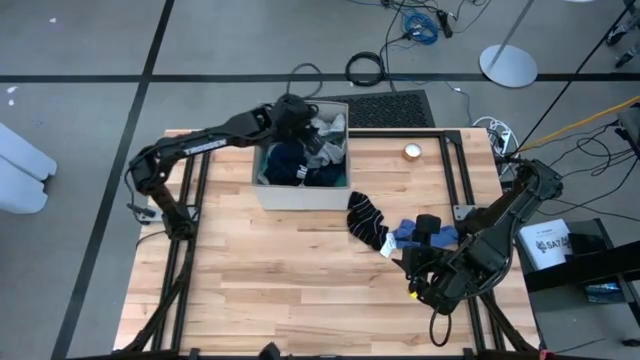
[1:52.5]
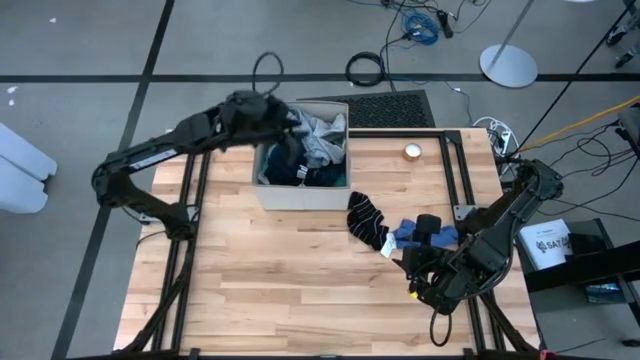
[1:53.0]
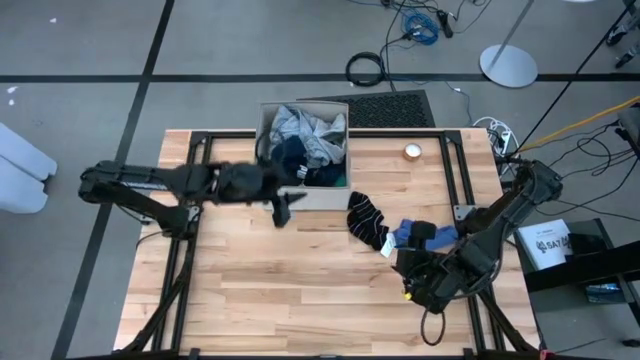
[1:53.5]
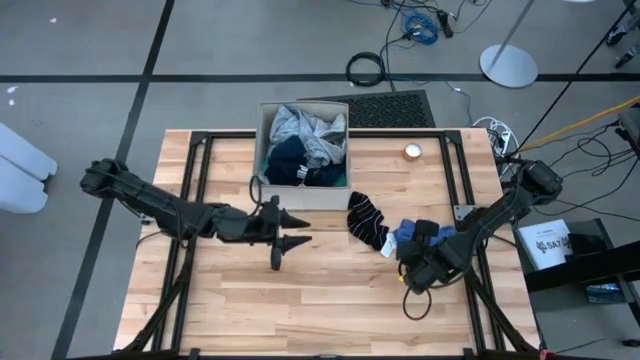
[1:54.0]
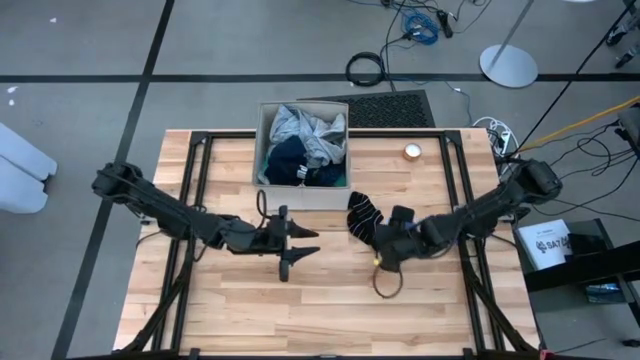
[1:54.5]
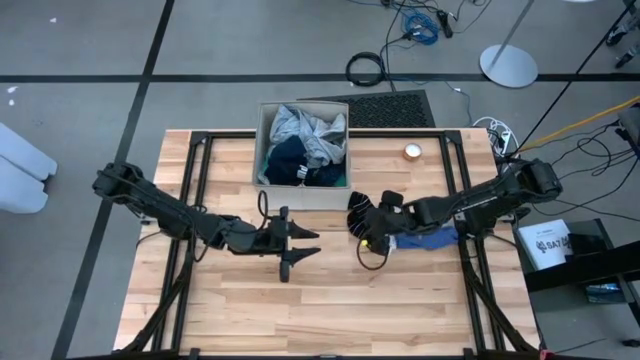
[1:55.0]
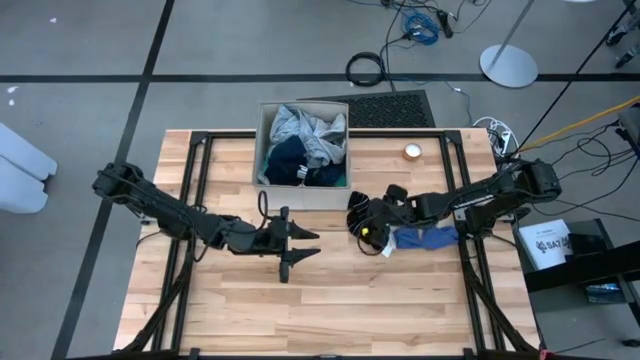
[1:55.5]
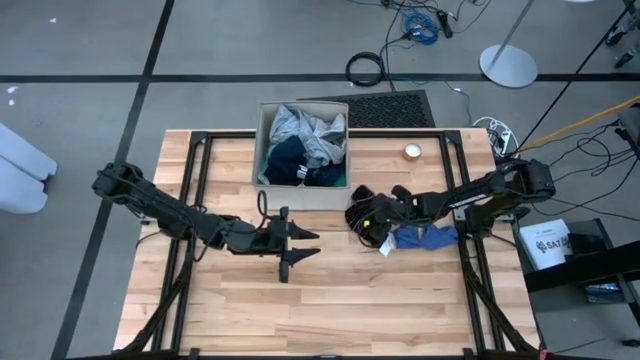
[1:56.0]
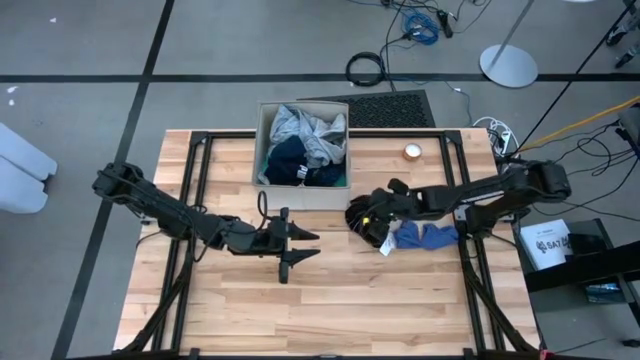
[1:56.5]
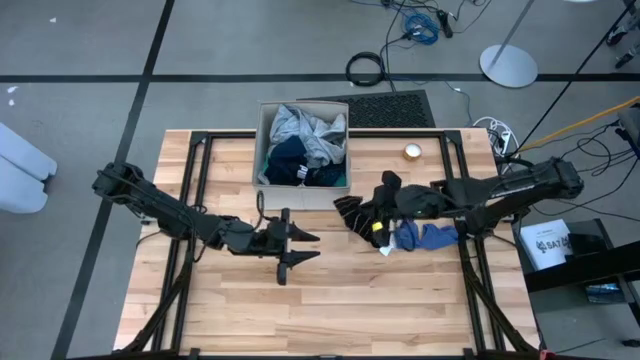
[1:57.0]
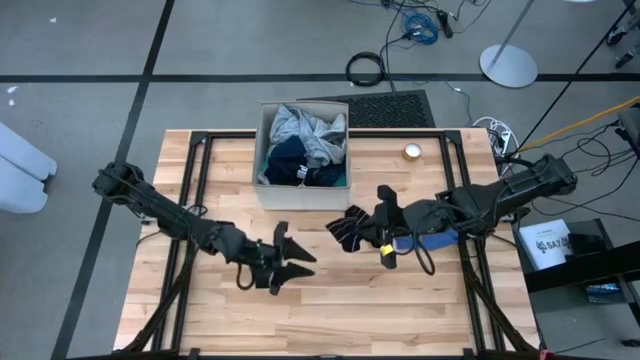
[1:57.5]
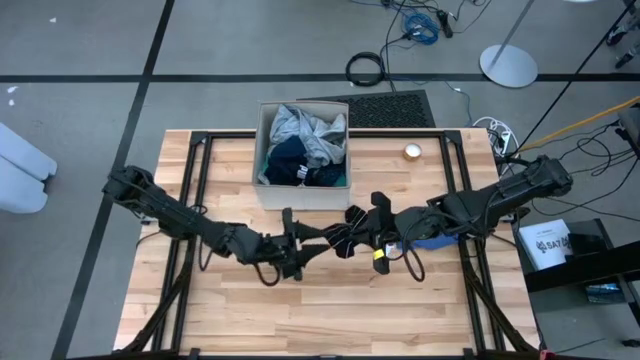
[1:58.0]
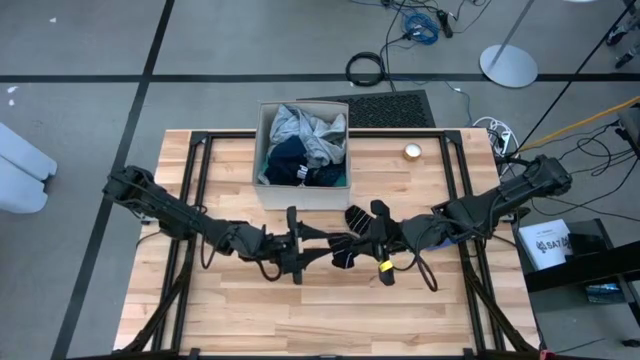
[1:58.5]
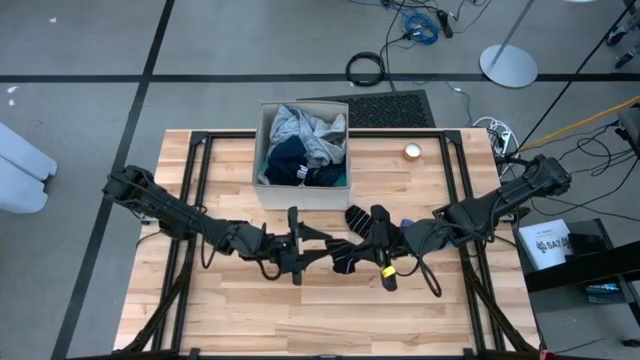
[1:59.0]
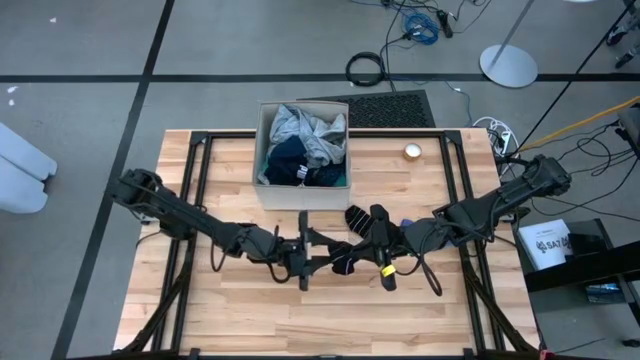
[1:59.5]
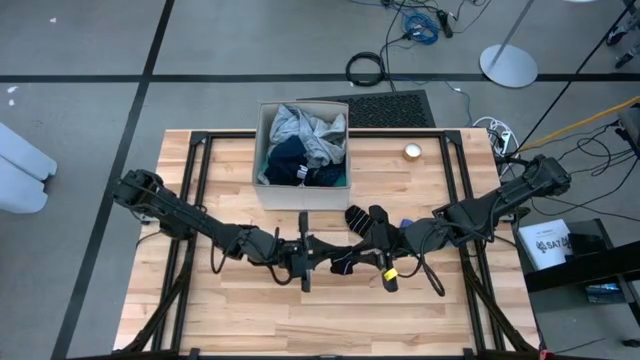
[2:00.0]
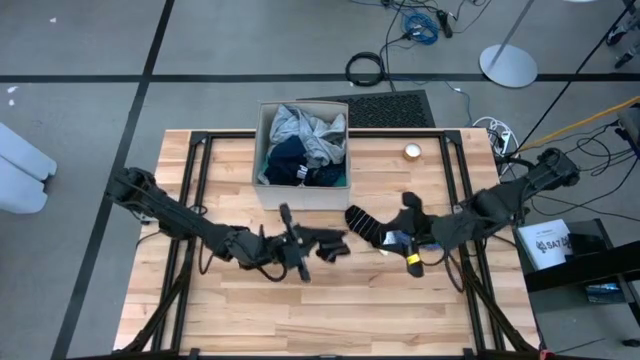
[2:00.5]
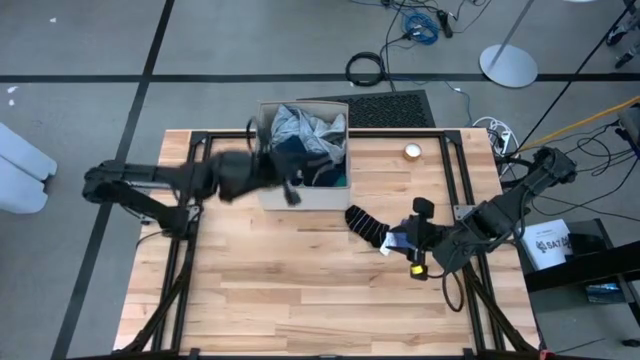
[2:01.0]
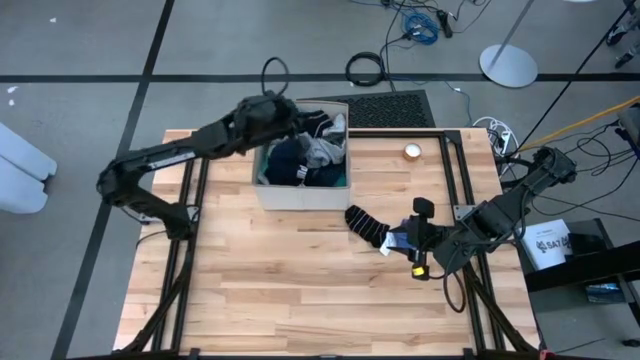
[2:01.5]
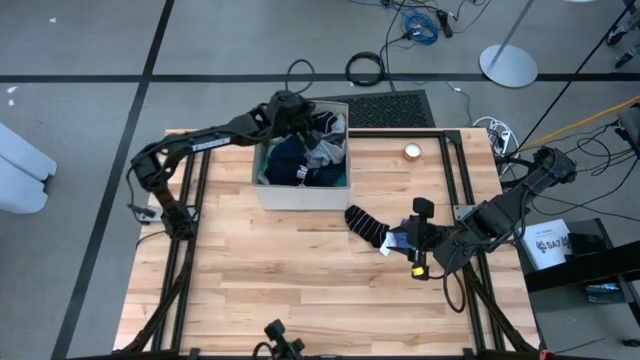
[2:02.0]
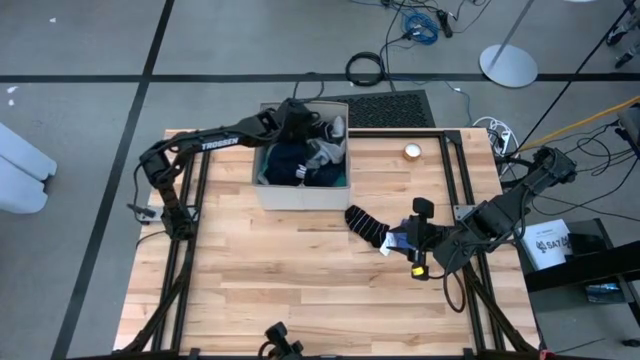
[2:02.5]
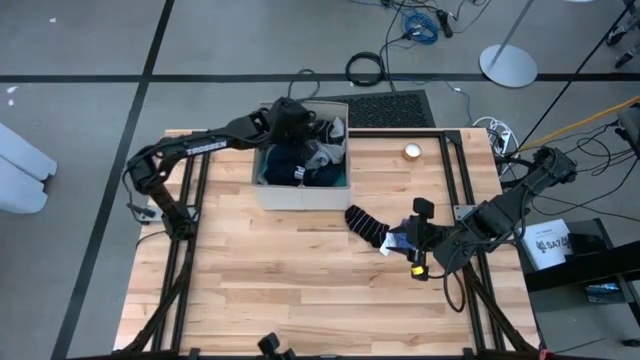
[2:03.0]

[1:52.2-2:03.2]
Task: Sort clothes
Put the black sock into the white laundry organizer

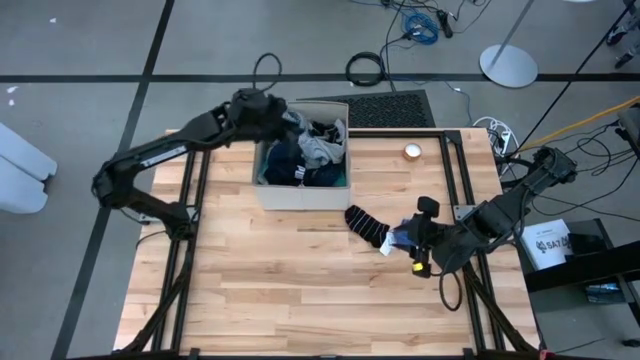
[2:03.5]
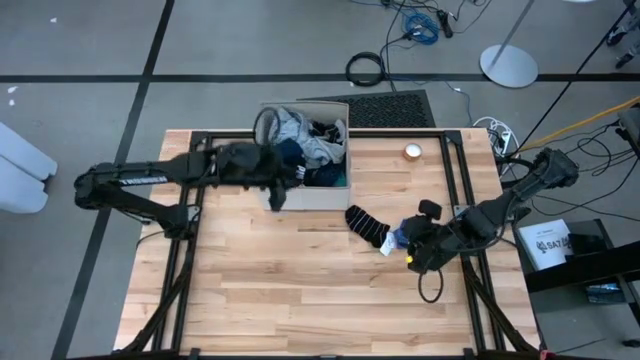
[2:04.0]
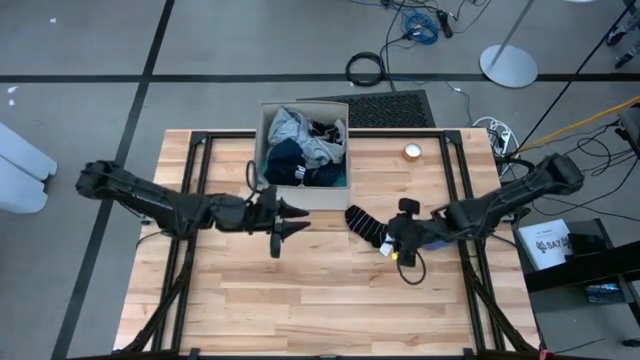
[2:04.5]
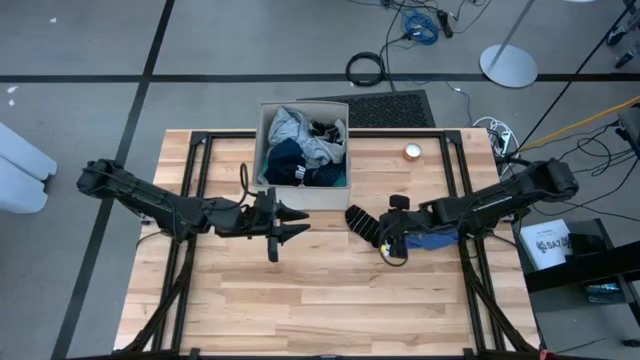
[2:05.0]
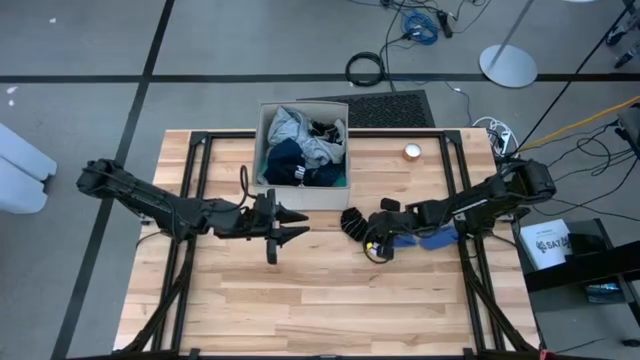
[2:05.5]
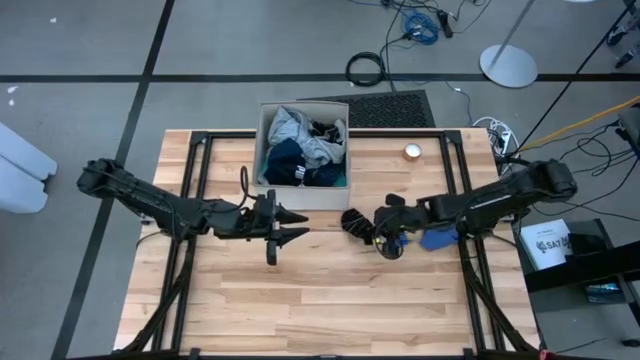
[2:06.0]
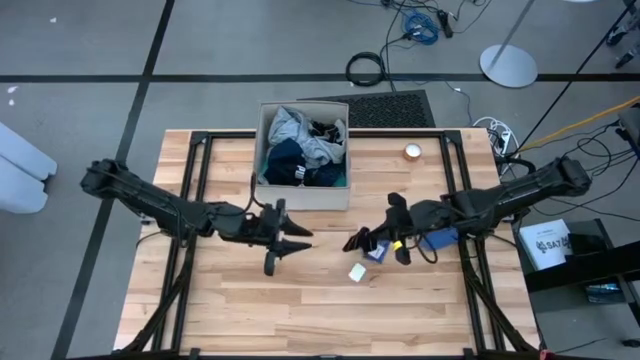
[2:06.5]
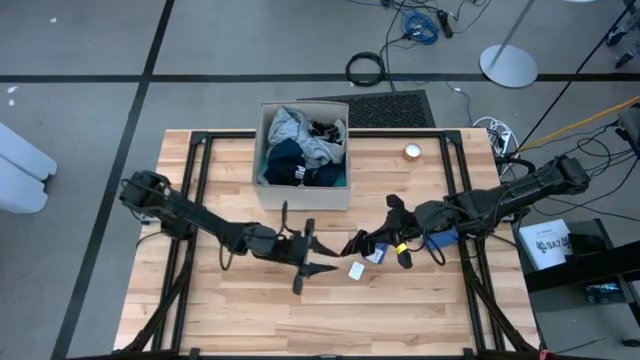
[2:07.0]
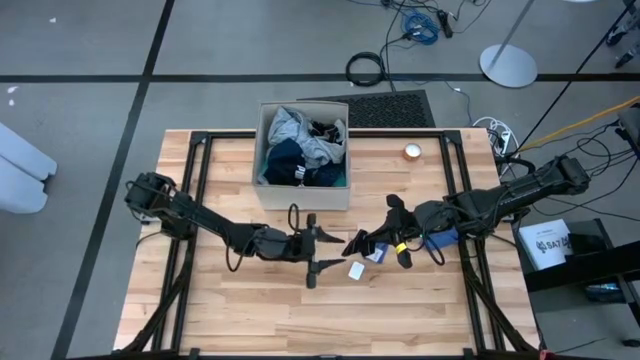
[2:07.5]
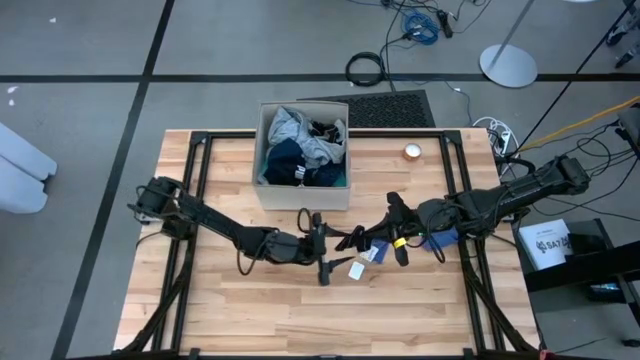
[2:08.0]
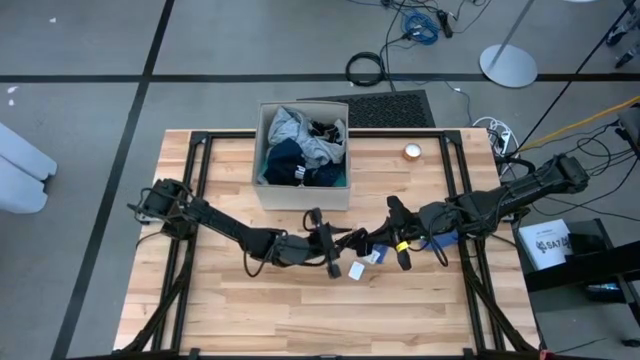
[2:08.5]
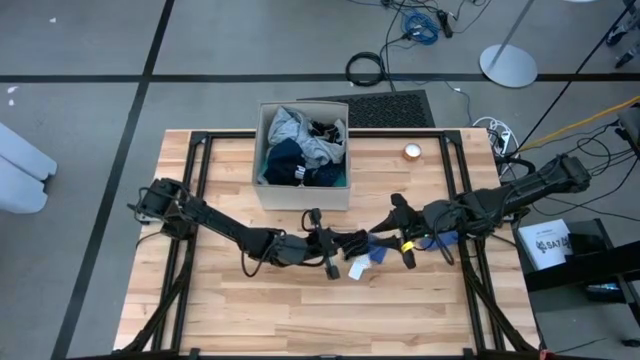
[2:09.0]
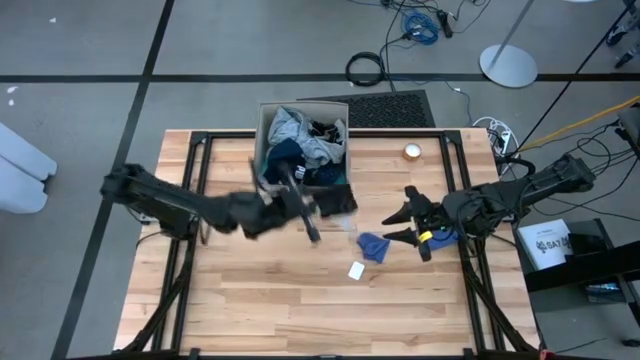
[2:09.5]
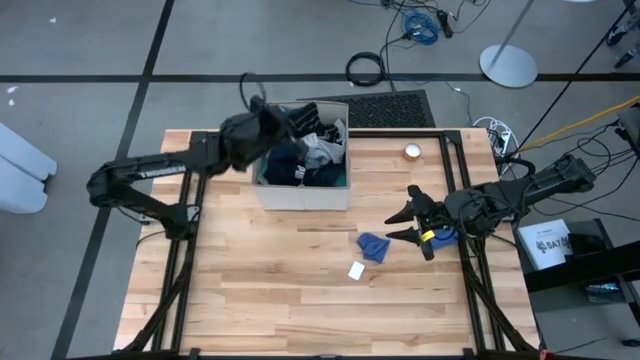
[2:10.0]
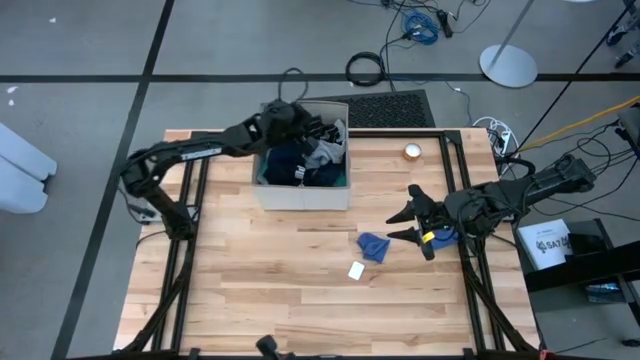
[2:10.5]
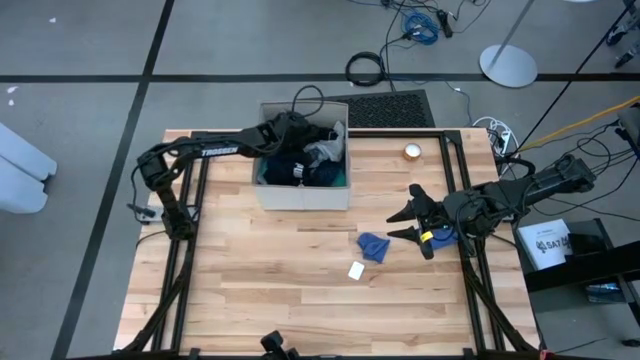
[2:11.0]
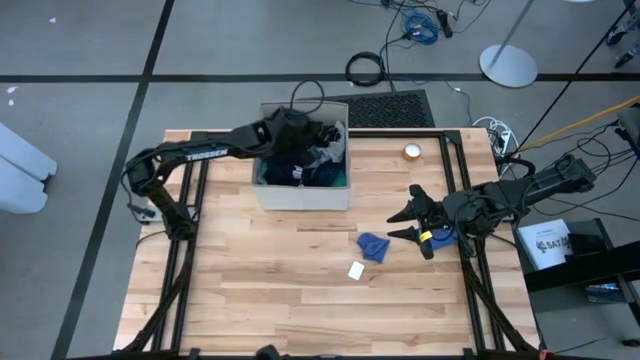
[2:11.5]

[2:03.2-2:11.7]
Put the black sock into the white laundry organizer
